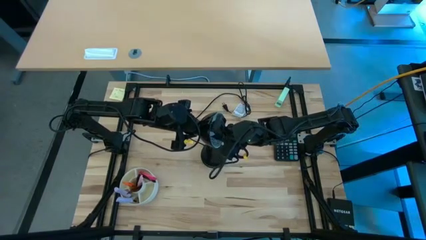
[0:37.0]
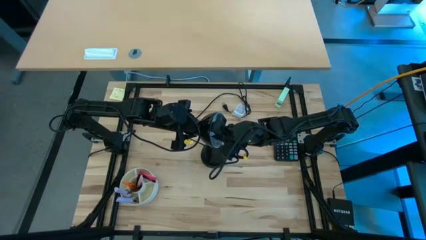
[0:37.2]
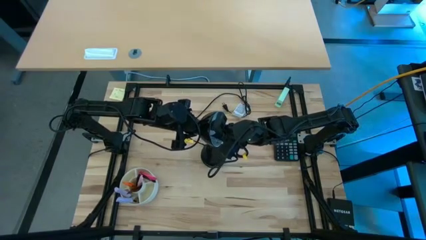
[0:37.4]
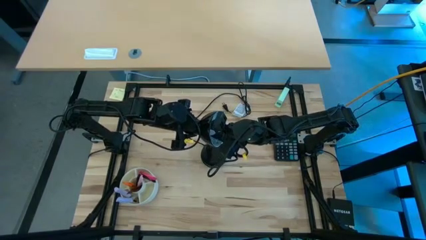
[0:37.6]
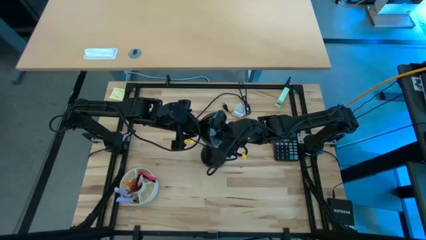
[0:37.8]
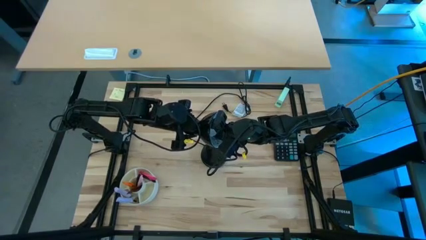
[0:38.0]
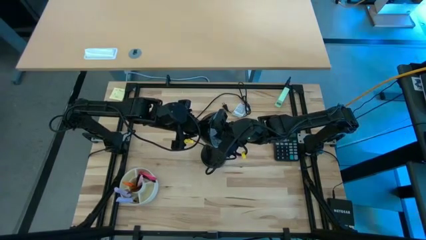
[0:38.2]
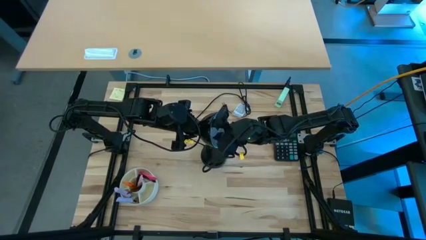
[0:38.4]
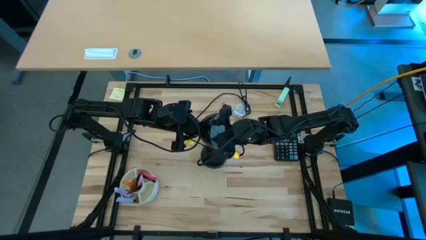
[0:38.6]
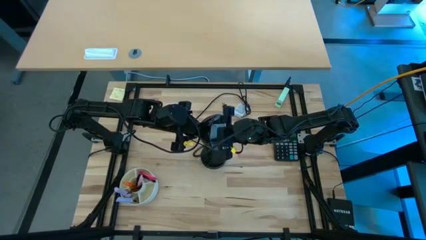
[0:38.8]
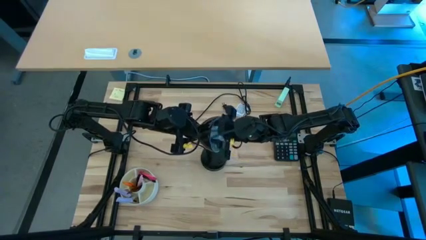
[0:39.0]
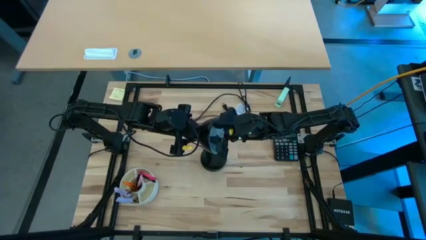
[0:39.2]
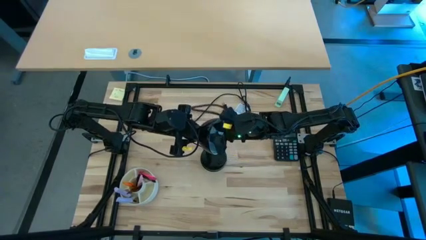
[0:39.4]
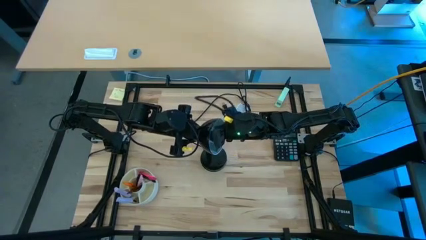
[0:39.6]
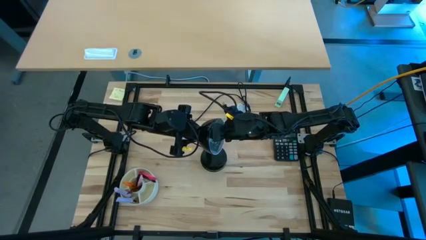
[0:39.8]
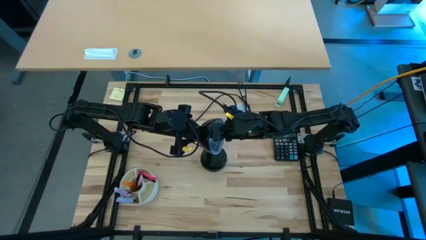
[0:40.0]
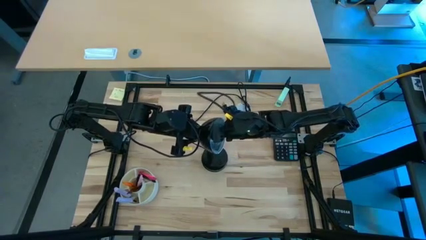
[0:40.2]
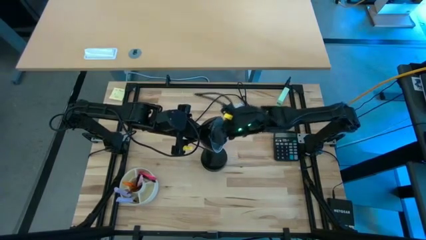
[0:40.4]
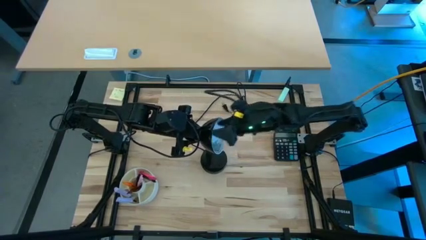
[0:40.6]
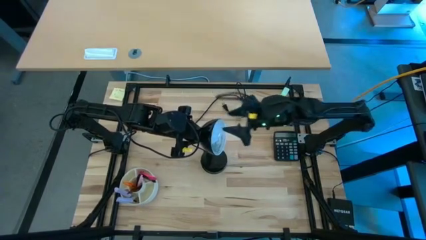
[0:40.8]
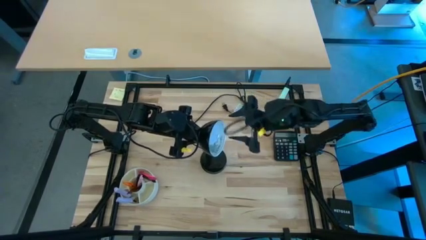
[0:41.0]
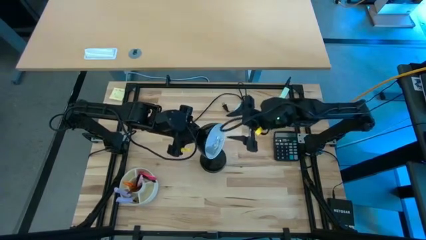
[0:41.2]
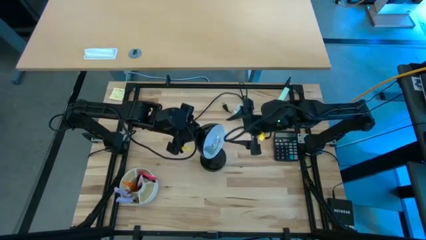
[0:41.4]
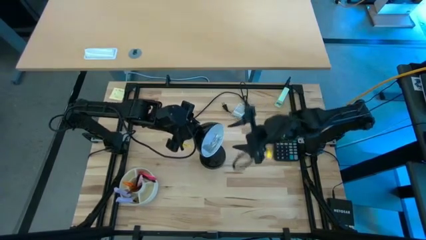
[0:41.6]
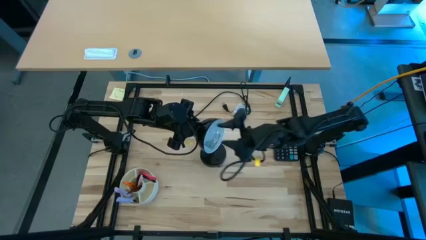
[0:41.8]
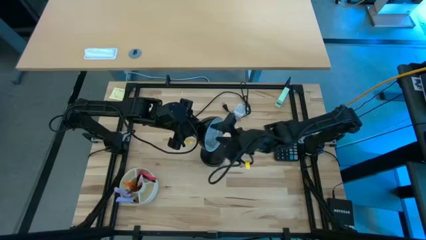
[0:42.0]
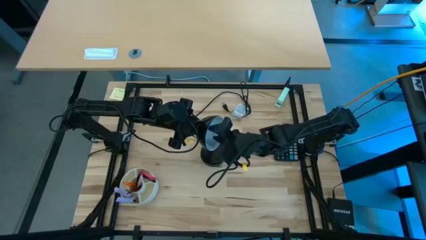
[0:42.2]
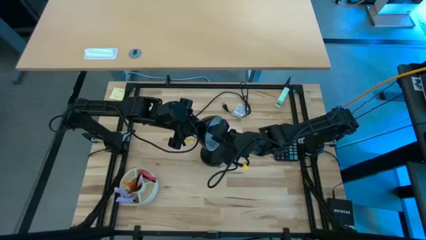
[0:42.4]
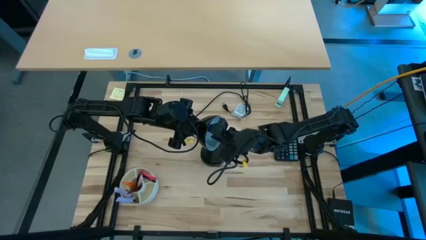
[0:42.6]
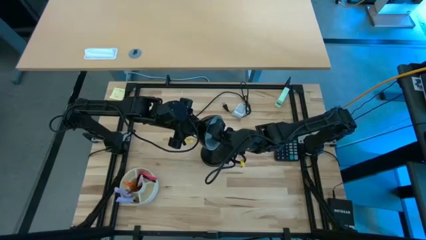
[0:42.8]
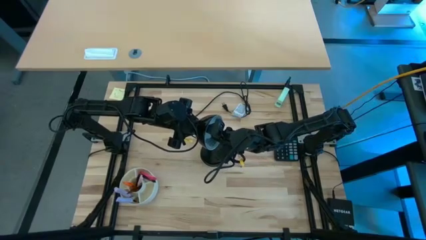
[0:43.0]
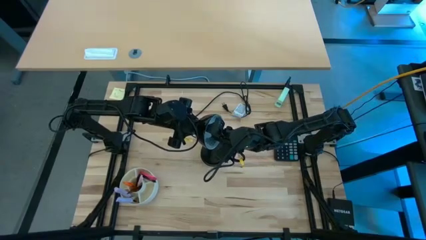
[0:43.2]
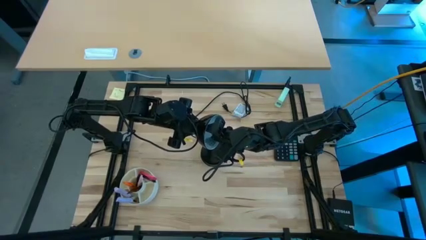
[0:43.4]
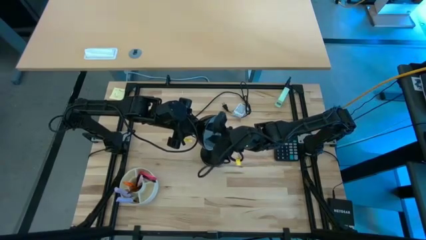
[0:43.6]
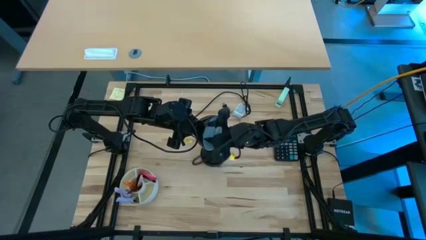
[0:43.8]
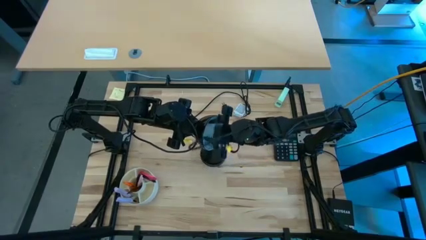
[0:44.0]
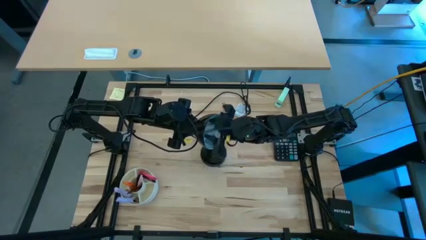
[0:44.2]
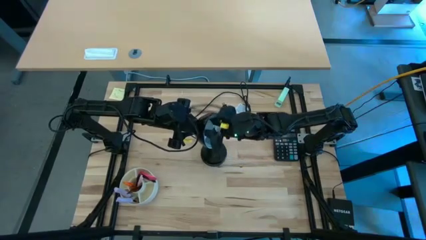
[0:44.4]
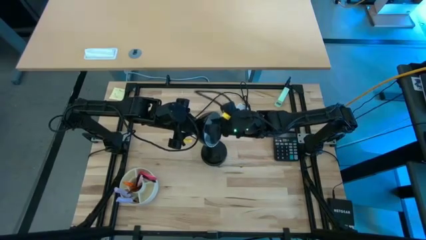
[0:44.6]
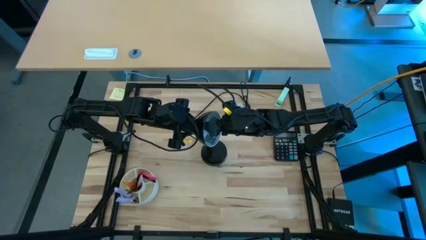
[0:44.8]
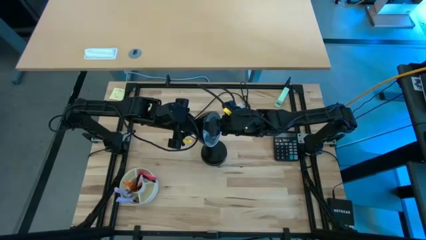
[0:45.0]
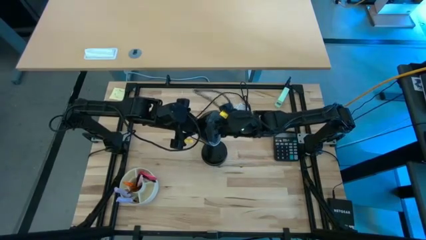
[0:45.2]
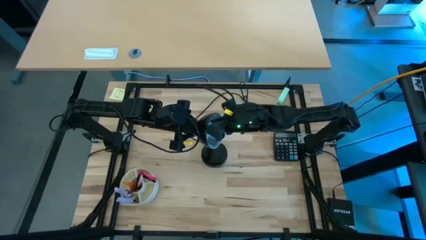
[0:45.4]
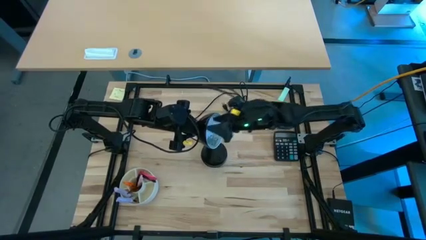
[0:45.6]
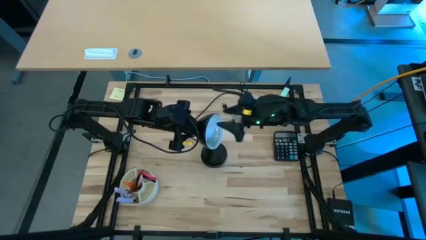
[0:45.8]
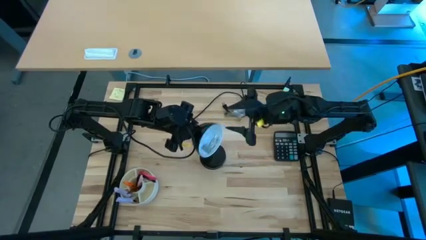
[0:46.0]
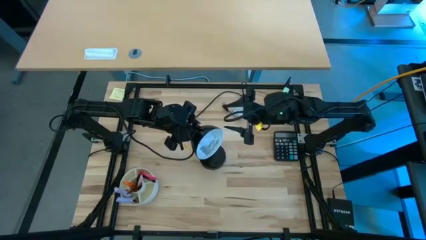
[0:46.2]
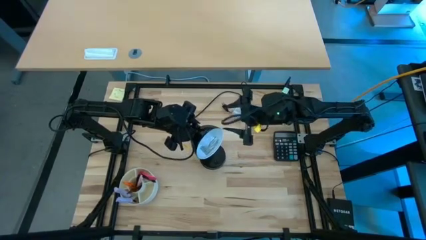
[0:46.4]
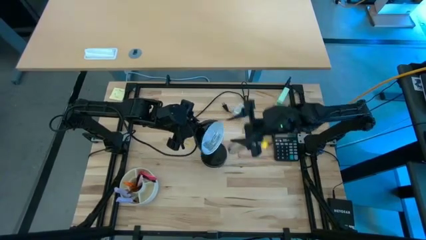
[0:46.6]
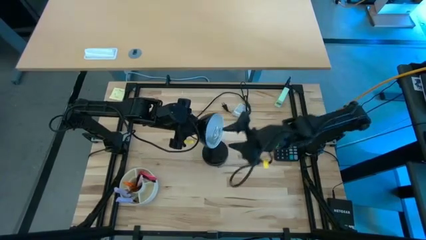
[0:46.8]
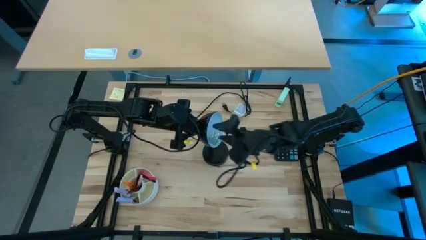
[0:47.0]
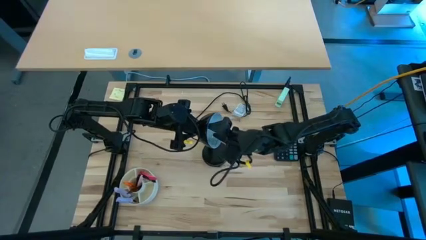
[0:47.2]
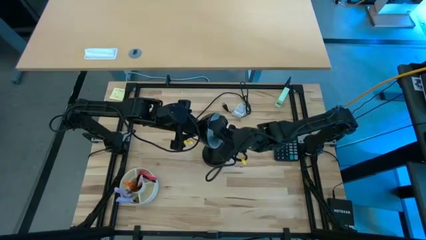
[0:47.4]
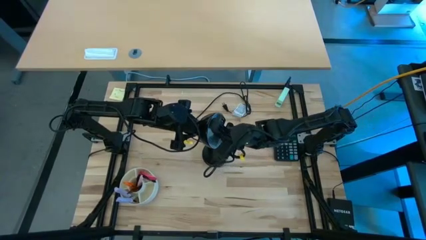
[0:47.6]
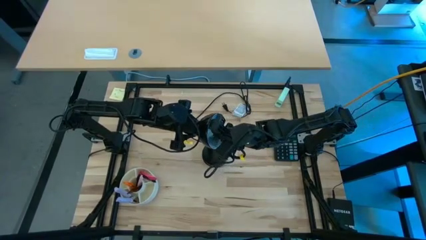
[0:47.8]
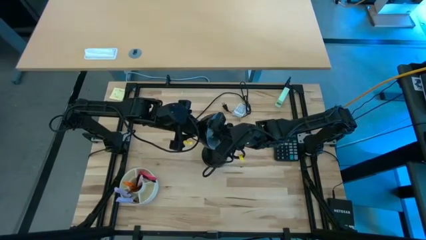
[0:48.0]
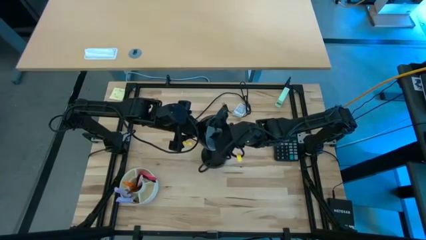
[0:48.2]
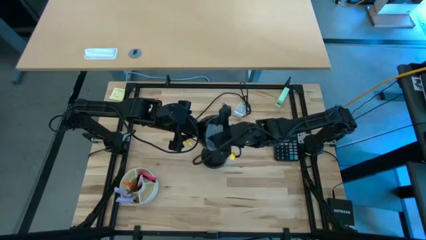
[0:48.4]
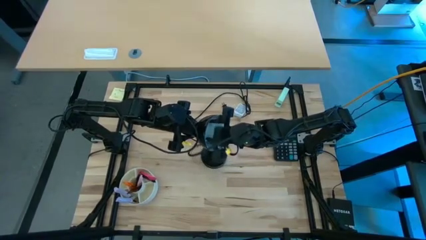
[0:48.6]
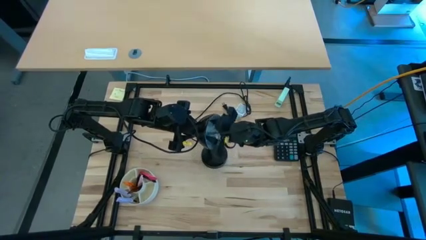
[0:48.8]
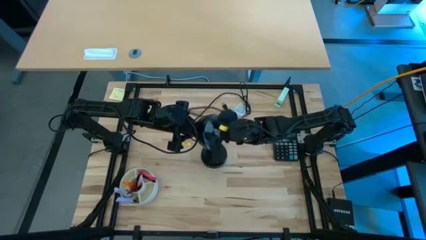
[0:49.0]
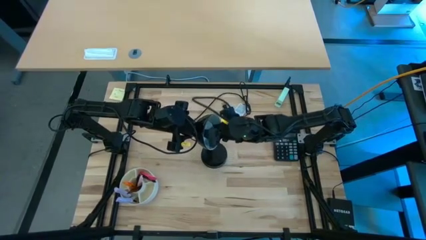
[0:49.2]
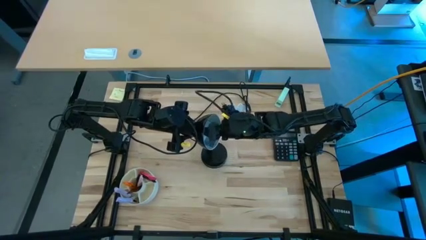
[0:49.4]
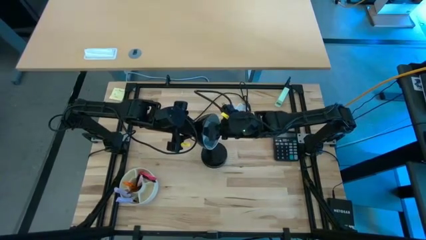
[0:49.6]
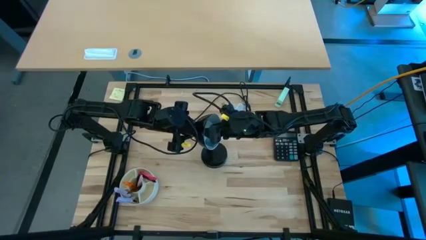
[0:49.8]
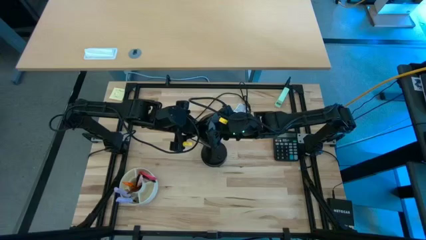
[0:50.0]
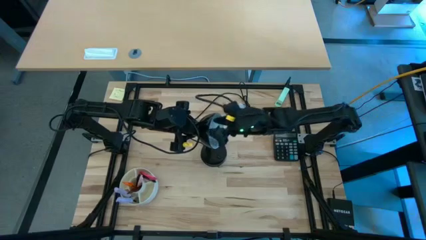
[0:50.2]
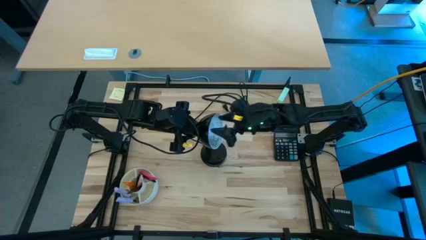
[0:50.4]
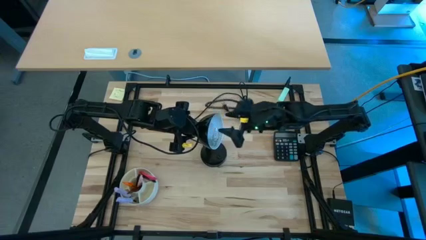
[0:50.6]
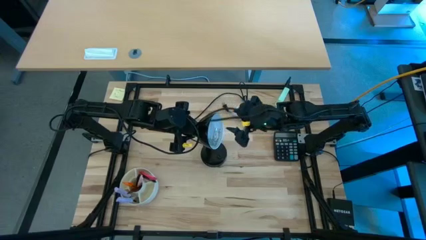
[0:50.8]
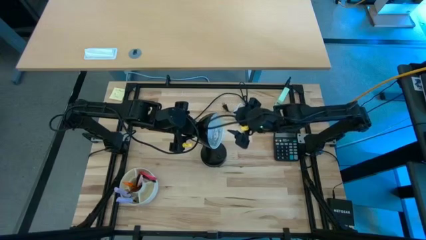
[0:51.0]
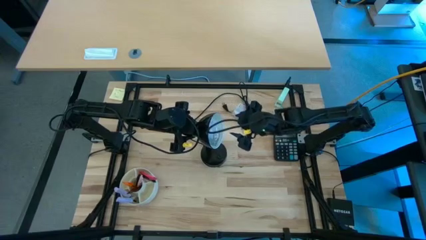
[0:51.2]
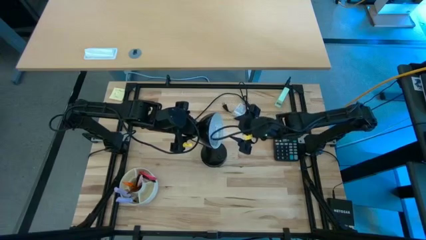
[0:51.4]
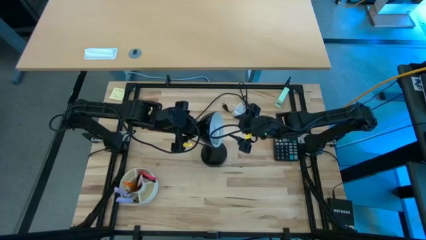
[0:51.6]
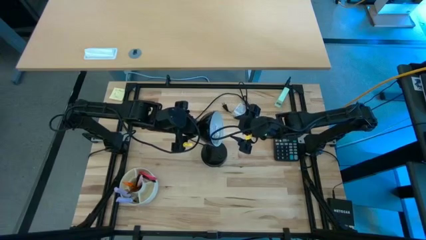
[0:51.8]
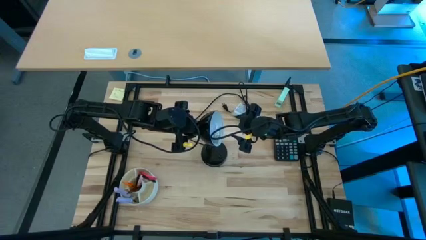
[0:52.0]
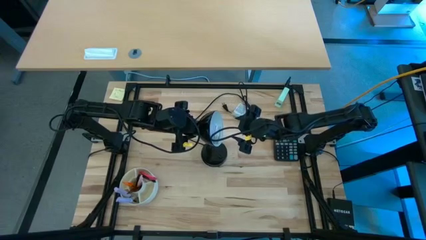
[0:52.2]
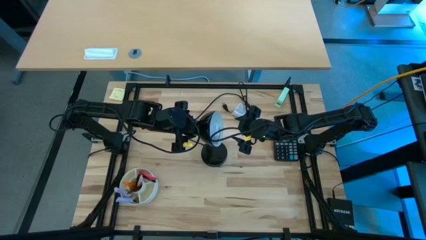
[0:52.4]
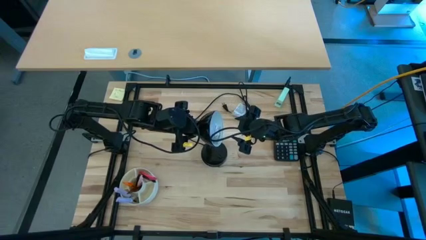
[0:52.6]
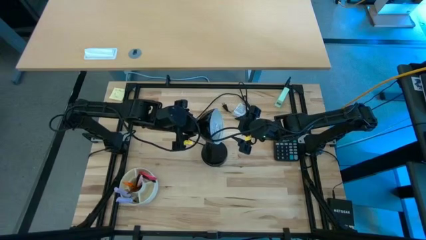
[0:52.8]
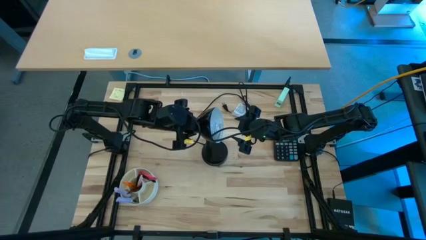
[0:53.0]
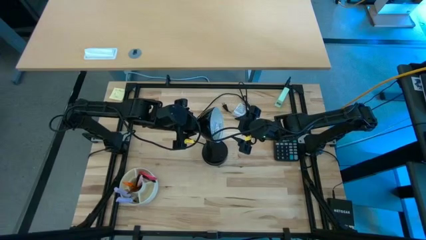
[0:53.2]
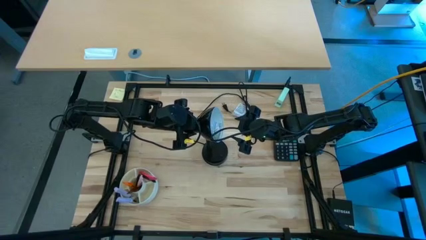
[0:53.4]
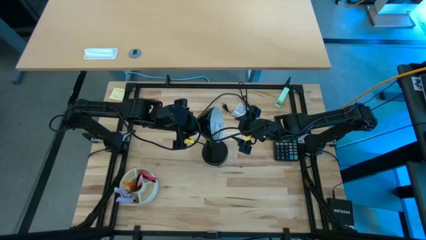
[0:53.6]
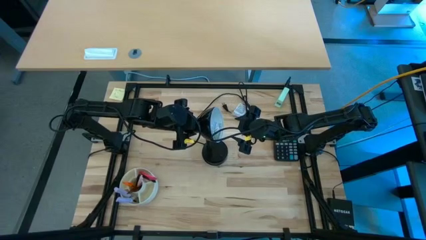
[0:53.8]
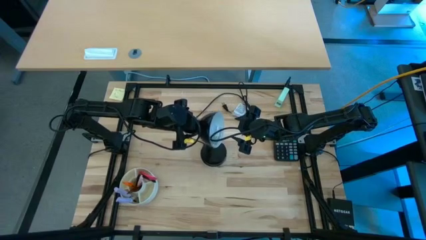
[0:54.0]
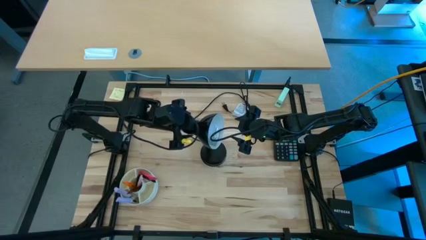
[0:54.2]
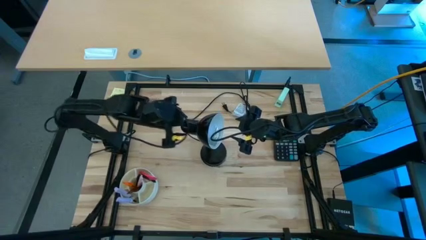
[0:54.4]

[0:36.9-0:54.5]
Task: Screw lightbulb
Insert the white lightbulb into the black desk lamp
